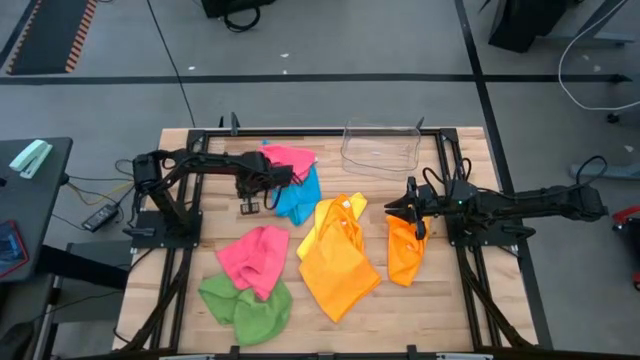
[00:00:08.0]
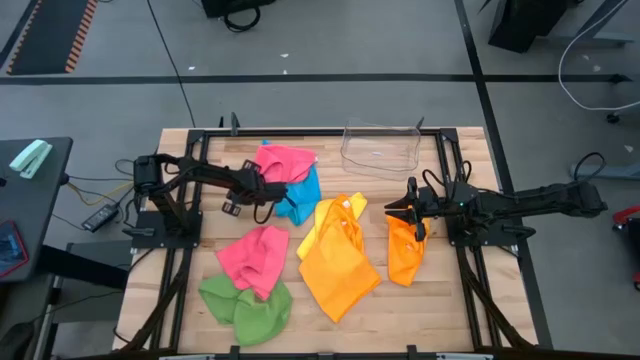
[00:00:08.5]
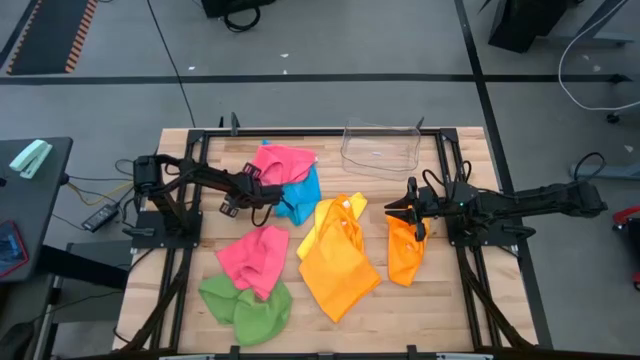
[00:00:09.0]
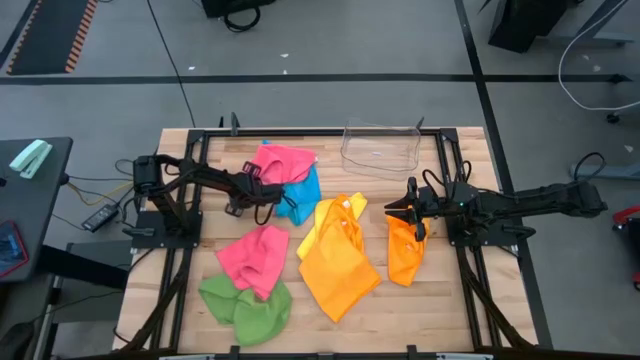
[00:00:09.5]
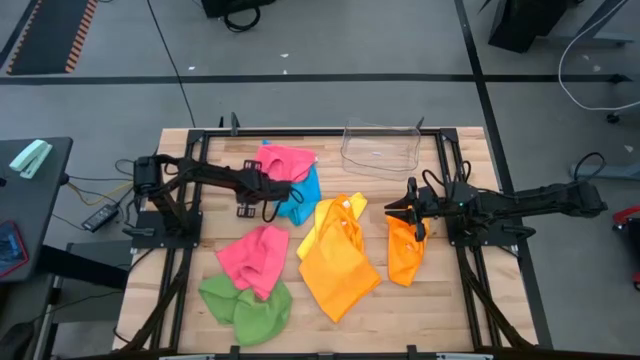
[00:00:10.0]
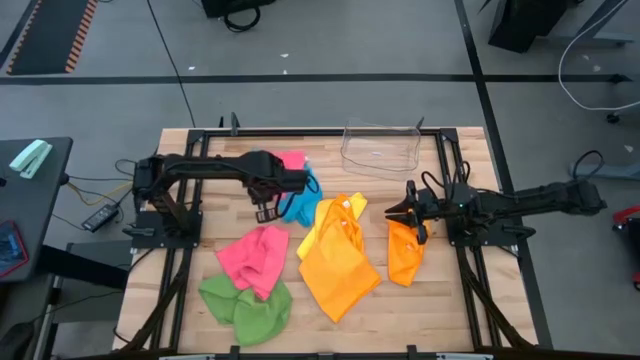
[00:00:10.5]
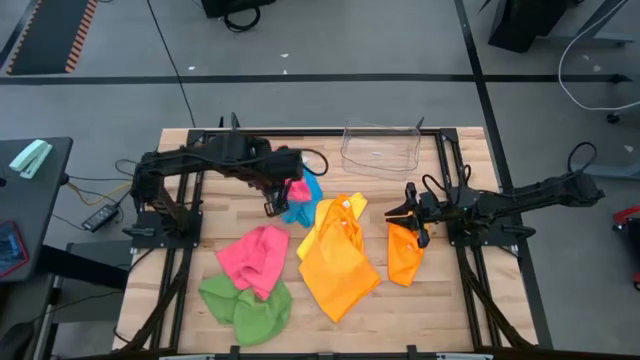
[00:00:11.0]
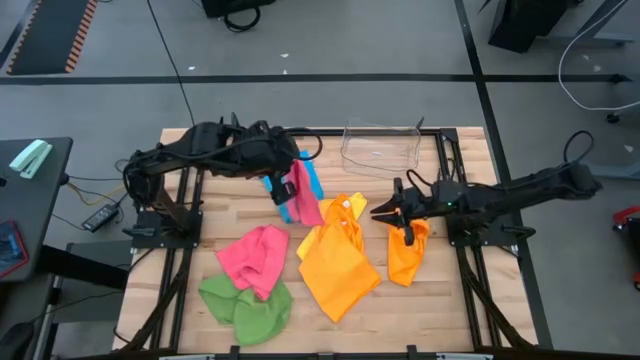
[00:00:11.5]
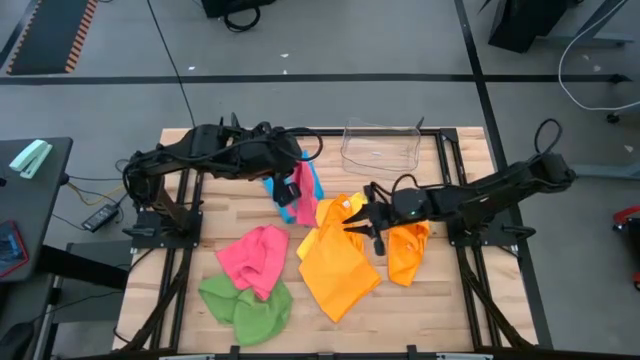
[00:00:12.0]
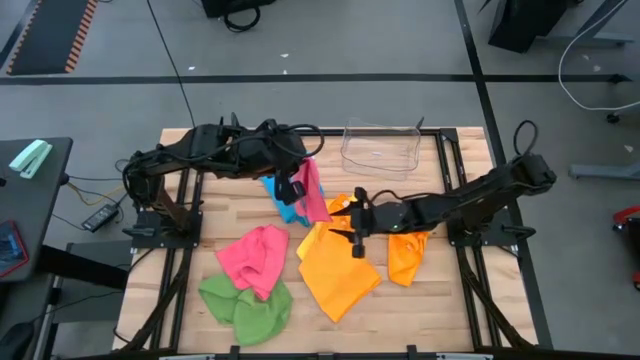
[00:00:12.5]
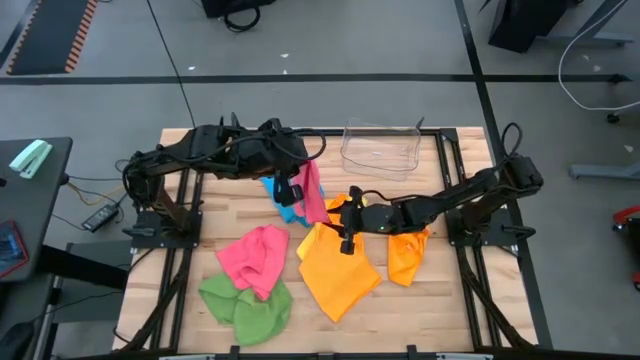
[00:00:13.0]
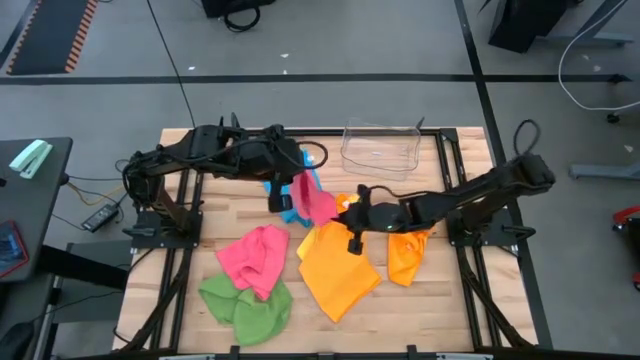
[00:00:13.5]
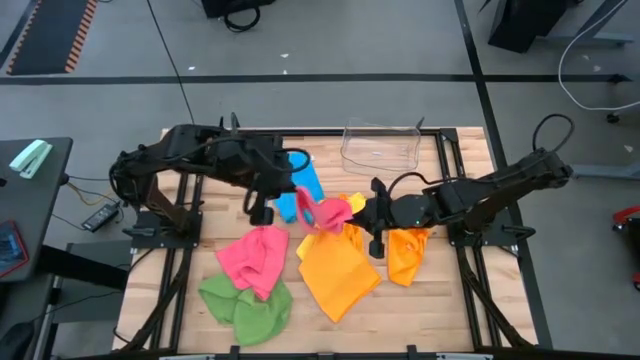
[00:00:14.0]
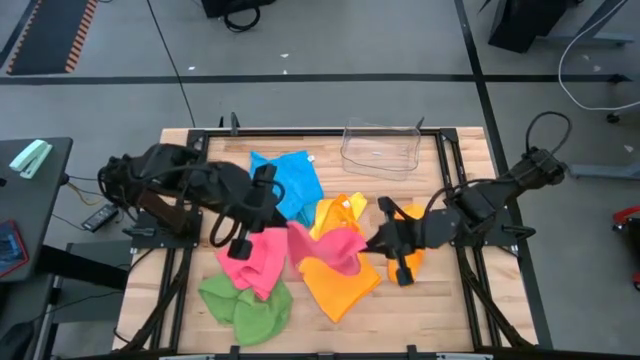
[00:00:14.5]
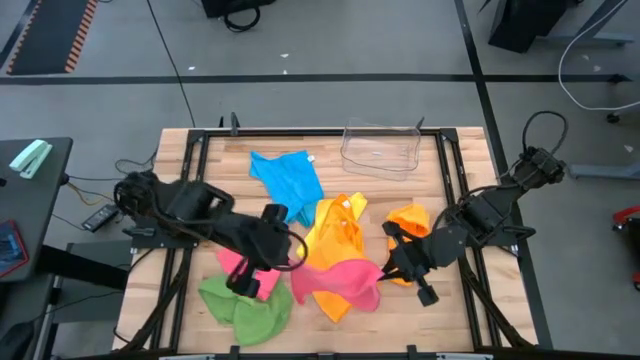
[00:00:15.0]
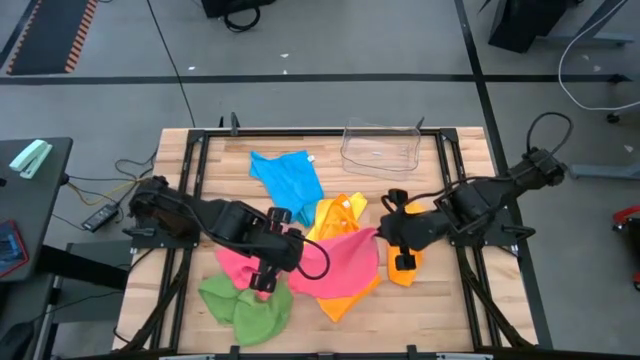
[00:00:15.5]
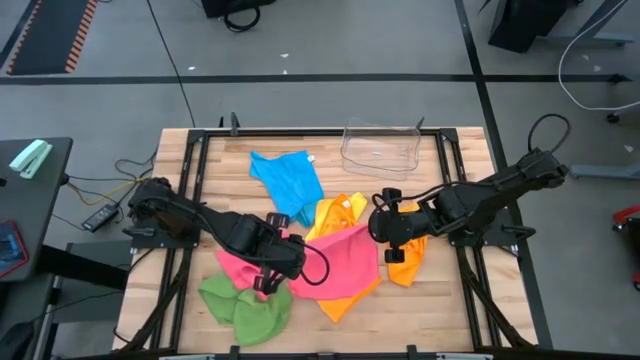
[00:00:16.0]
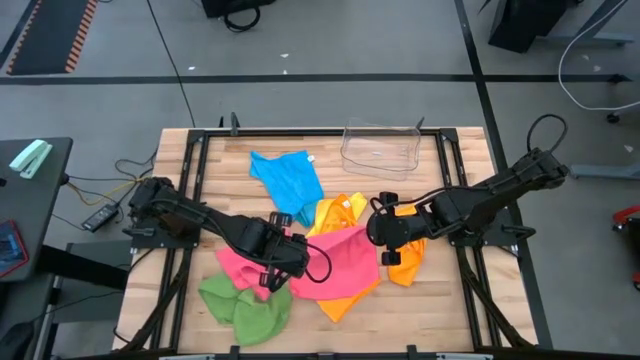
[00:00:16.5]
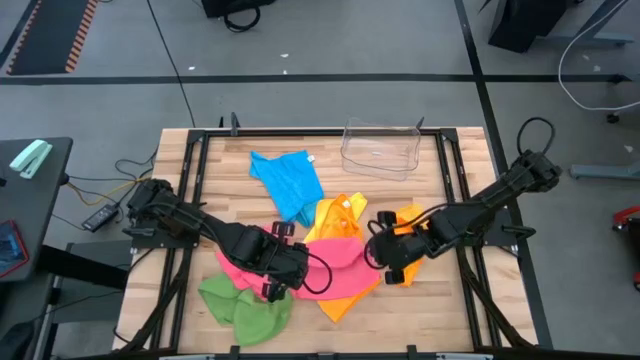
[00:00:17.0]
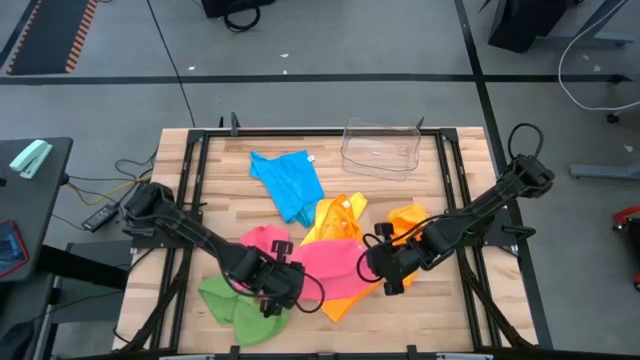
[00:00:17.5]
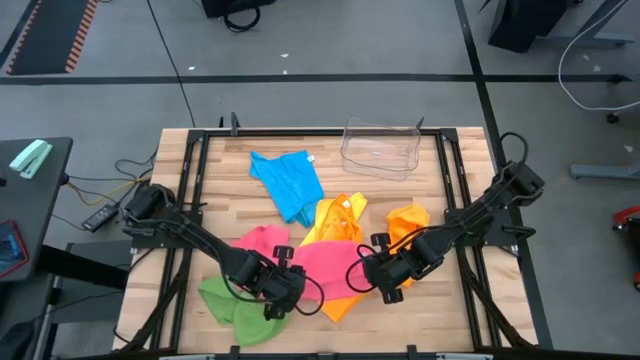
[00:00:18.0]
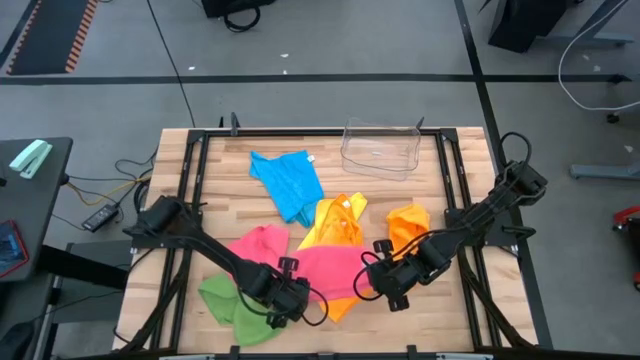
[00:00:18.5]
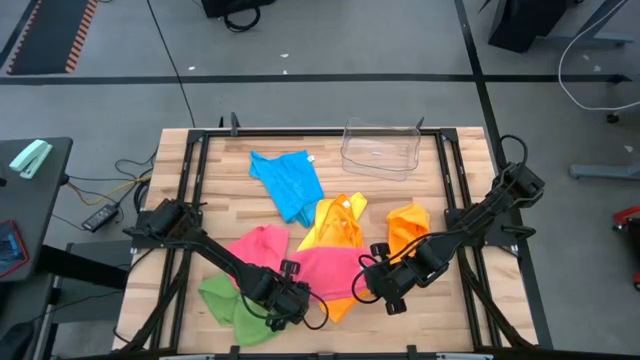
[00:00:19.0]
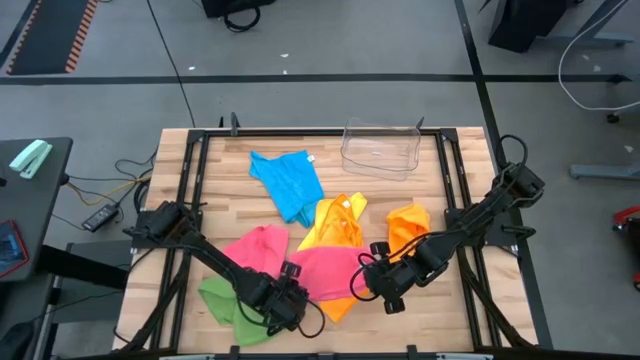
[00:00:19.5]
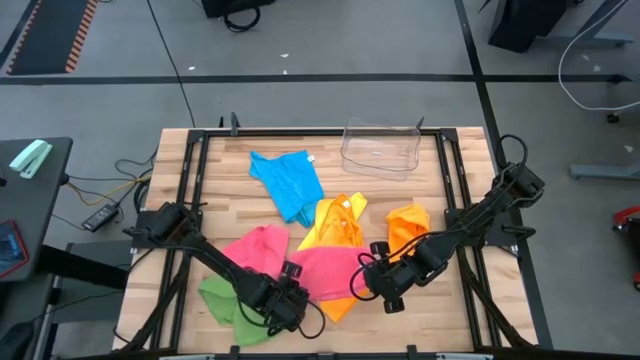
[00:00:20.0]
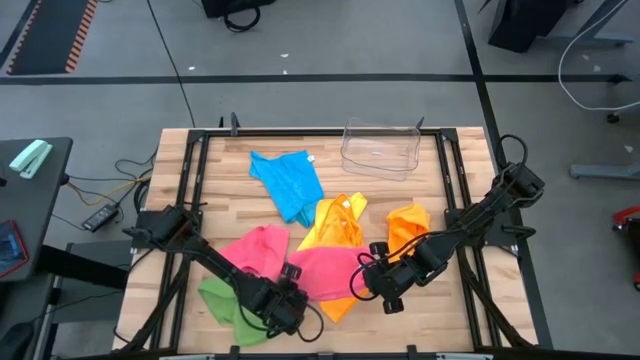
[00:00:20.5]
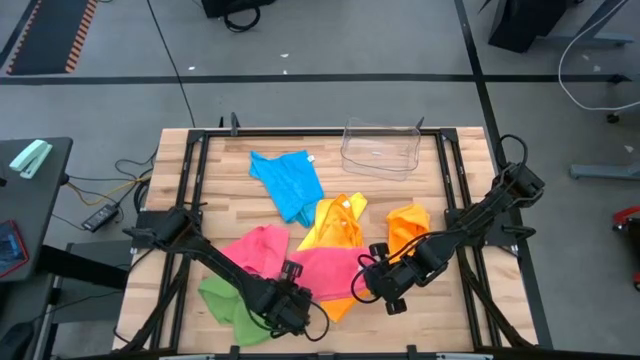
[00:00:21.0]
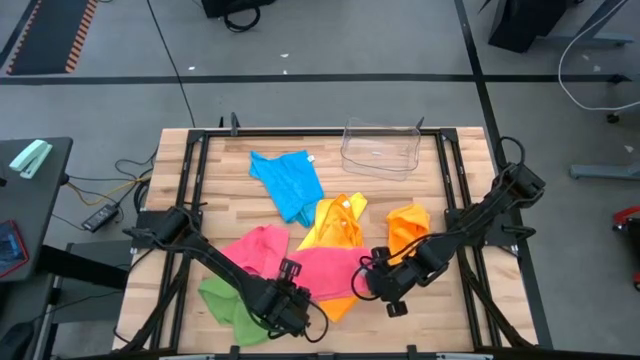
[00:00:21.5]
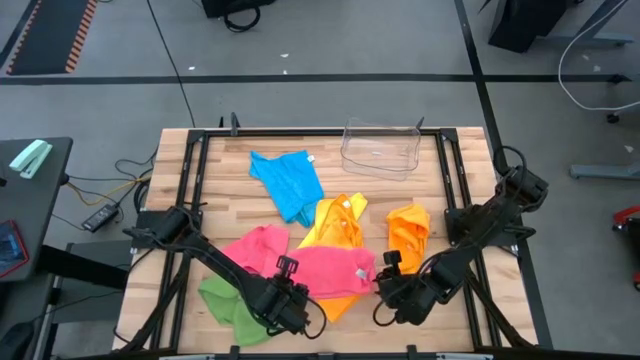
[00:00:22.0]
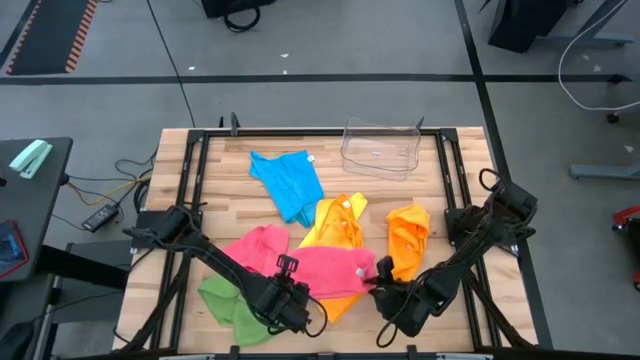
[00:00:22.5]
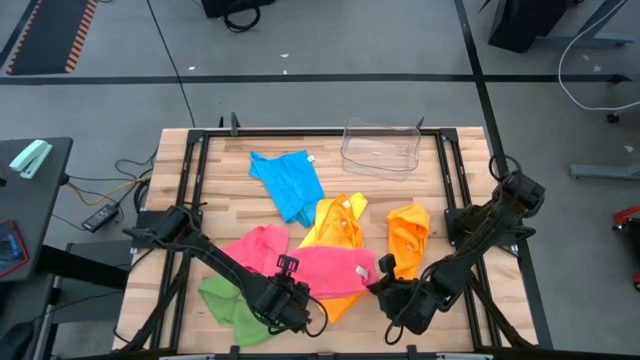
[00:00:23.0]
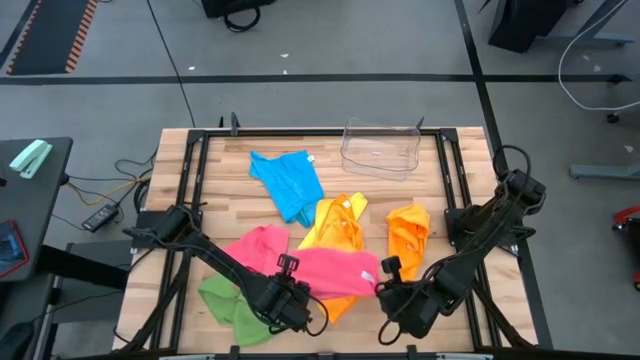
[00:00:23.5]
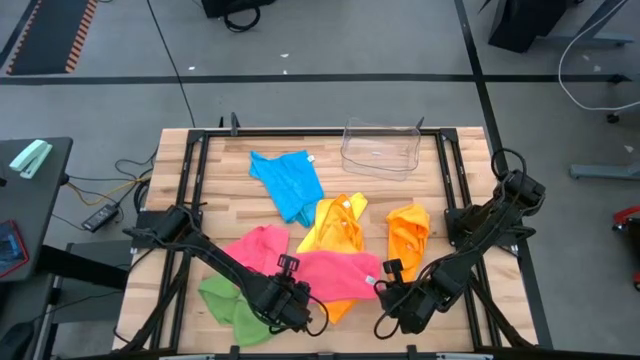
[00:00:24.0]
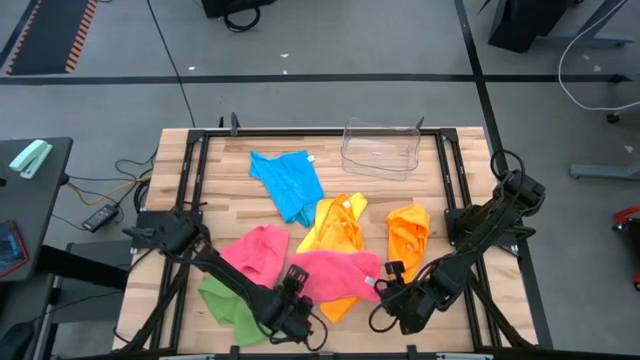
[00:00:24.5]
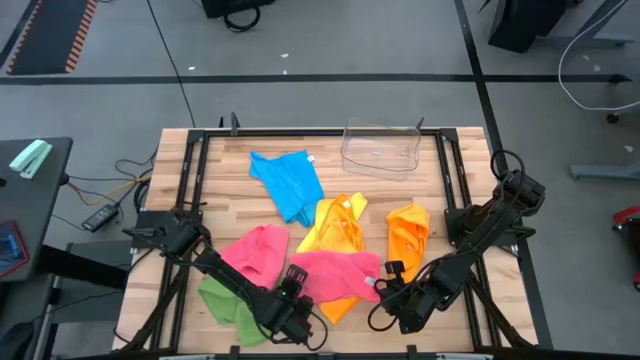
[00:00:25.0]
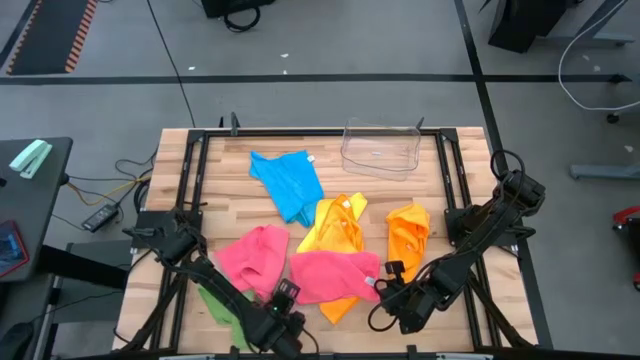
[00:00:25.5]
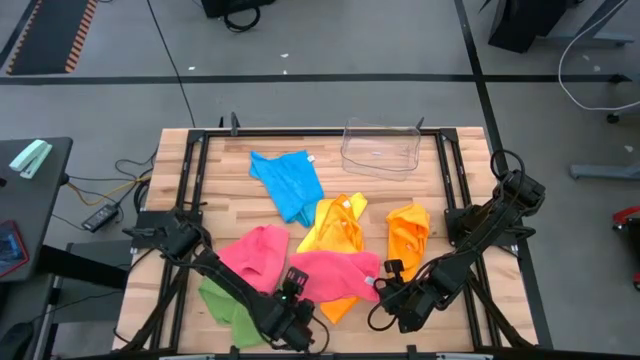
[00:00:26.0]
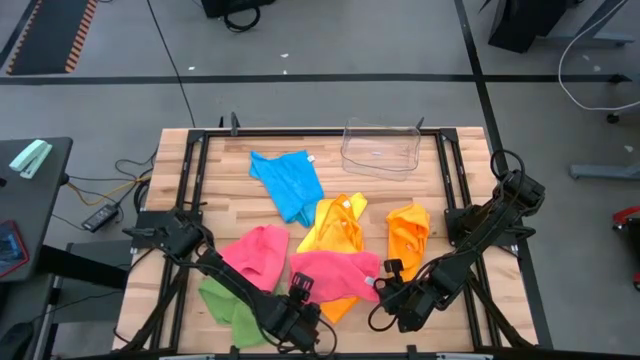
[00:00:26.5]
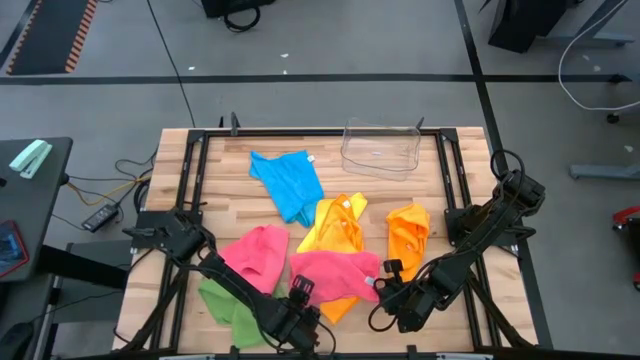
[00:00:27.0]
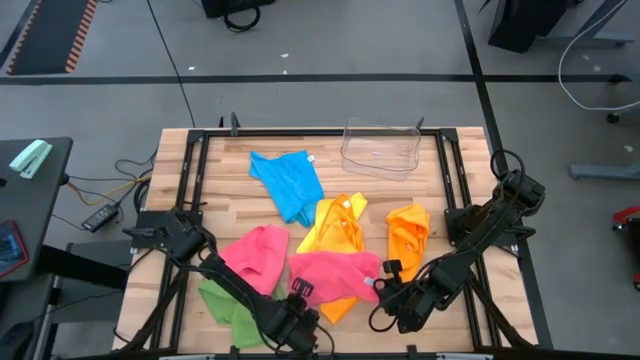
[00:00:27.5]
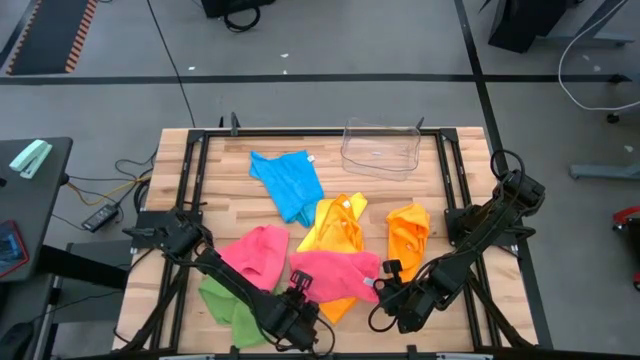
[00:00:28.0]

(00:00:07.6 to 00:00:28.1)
Task: Fold microfiber towels
Fold the top pink microfiber cloth
